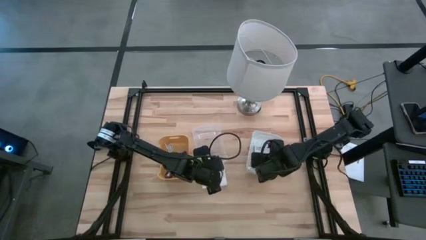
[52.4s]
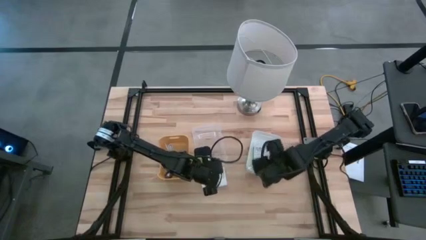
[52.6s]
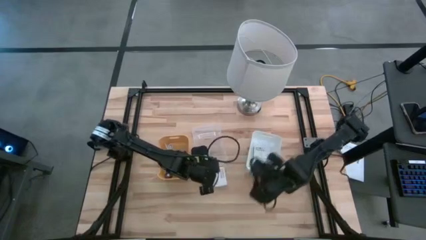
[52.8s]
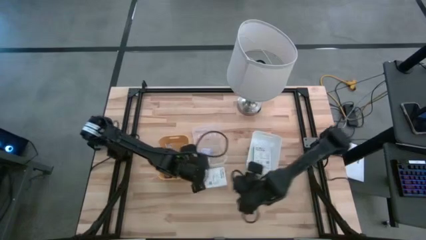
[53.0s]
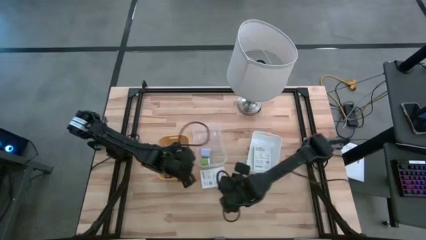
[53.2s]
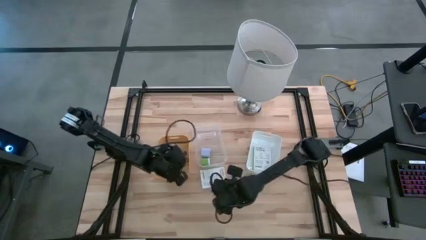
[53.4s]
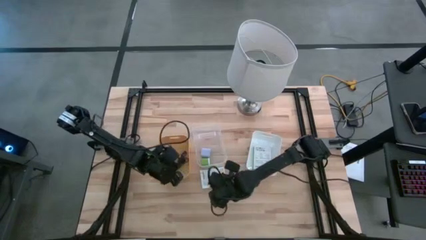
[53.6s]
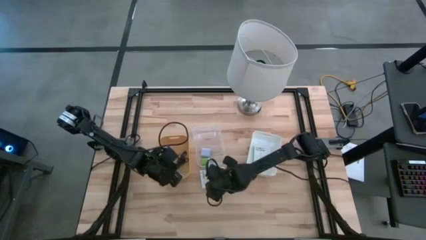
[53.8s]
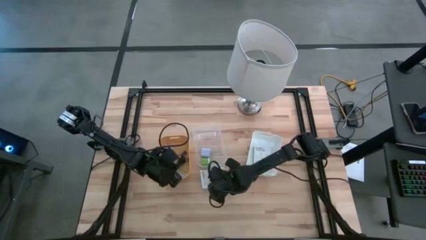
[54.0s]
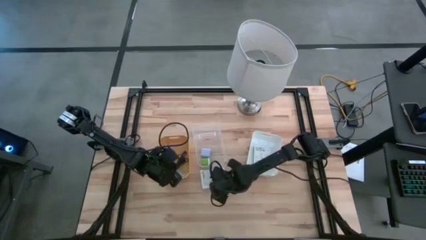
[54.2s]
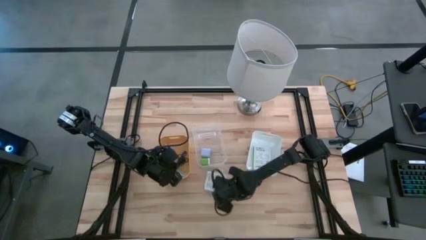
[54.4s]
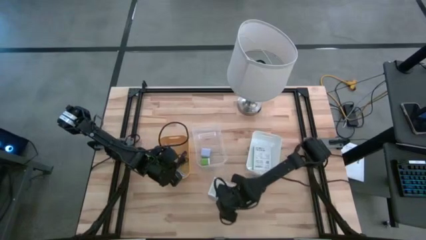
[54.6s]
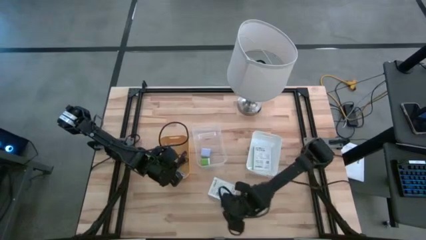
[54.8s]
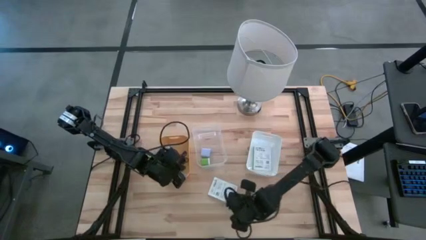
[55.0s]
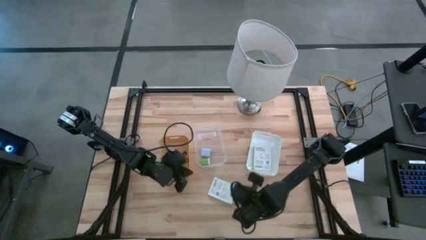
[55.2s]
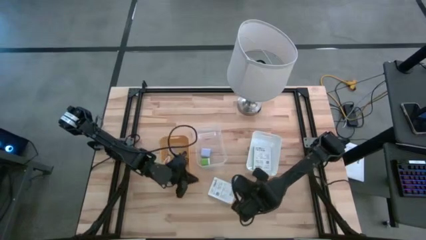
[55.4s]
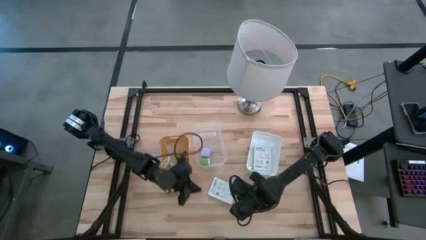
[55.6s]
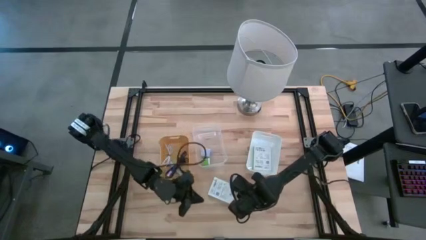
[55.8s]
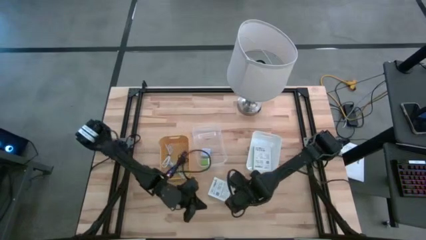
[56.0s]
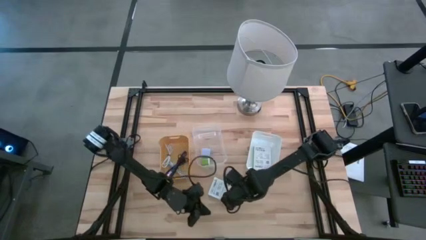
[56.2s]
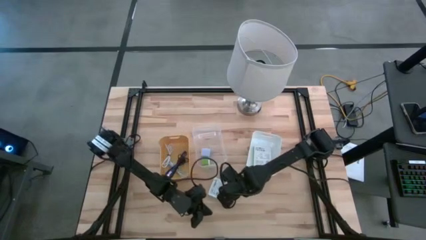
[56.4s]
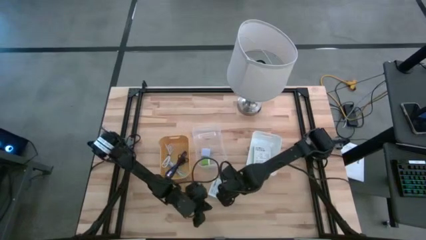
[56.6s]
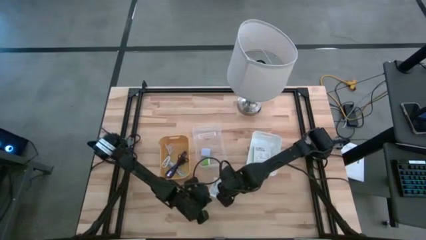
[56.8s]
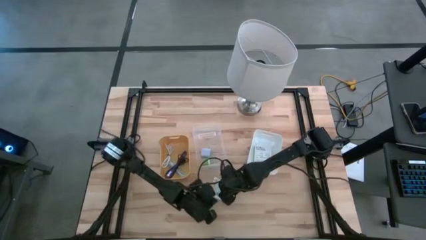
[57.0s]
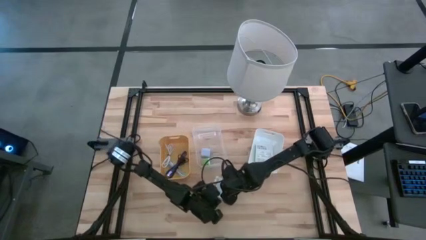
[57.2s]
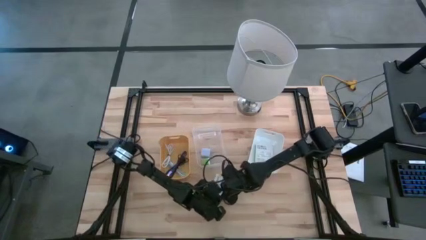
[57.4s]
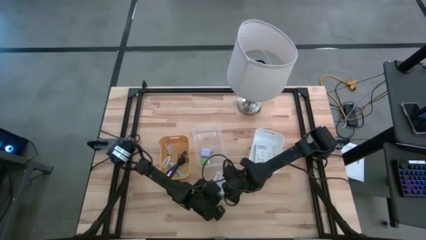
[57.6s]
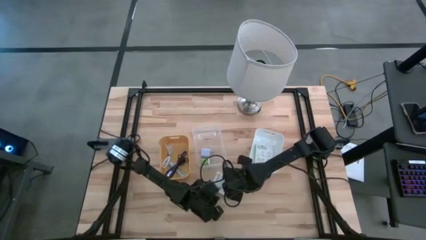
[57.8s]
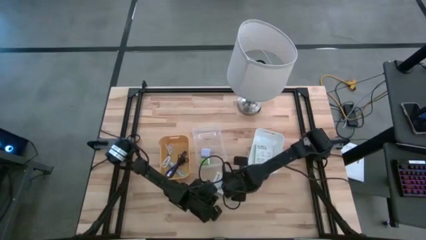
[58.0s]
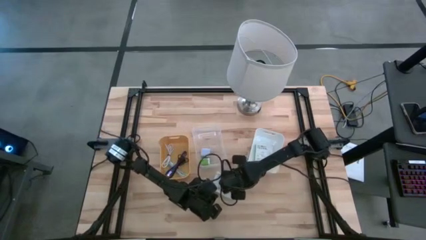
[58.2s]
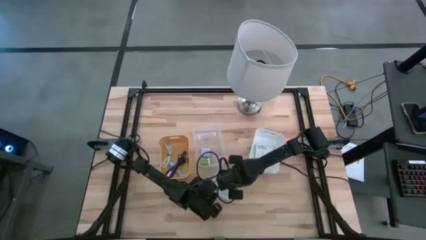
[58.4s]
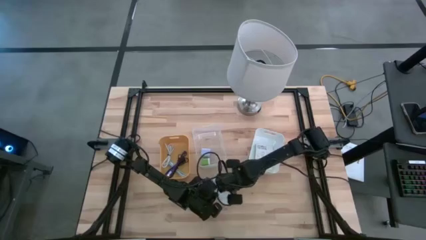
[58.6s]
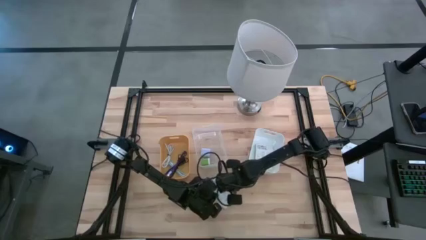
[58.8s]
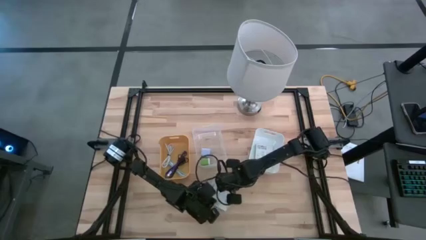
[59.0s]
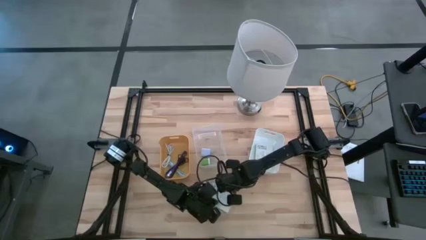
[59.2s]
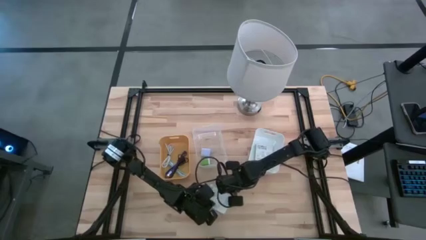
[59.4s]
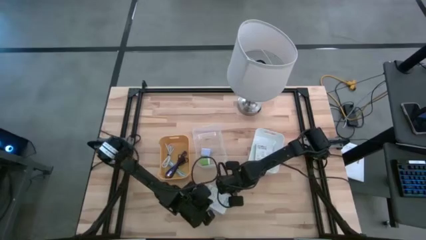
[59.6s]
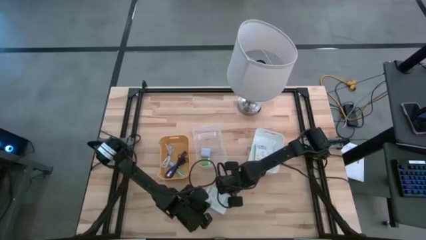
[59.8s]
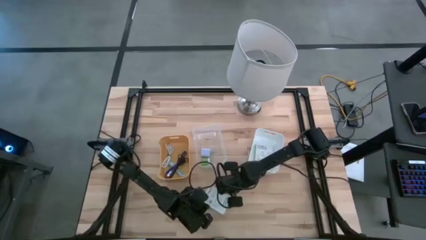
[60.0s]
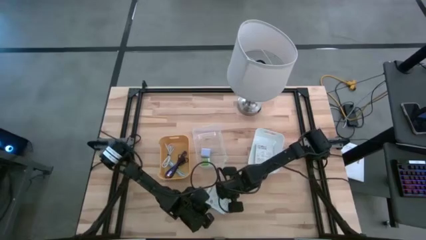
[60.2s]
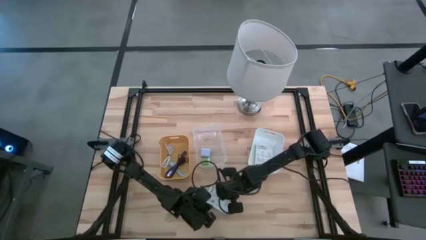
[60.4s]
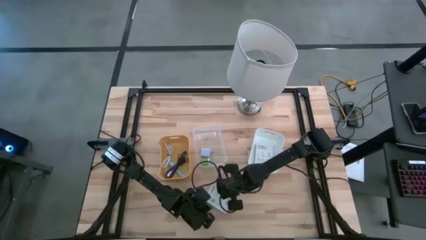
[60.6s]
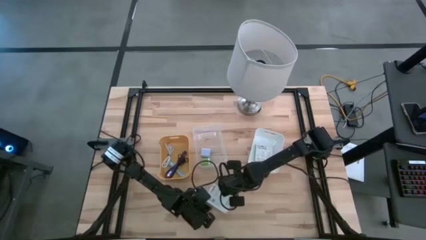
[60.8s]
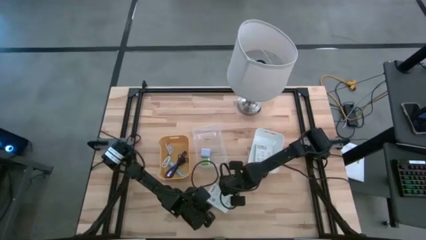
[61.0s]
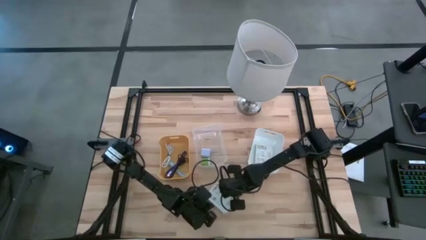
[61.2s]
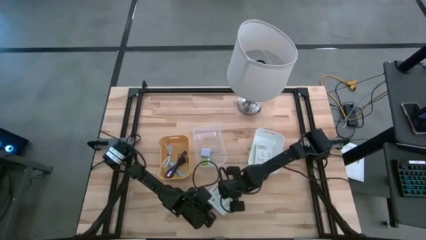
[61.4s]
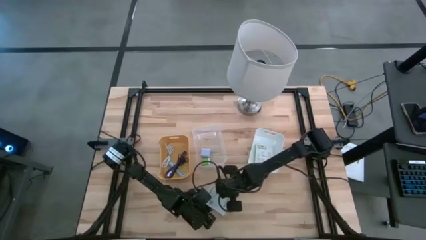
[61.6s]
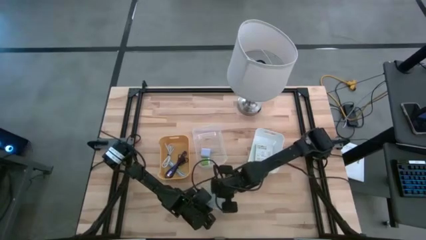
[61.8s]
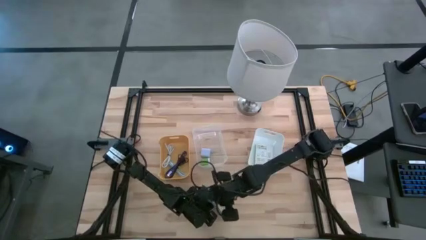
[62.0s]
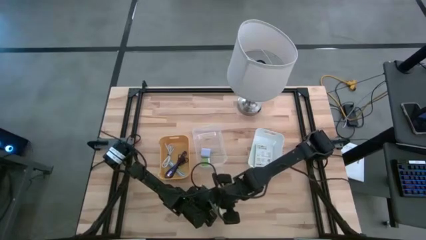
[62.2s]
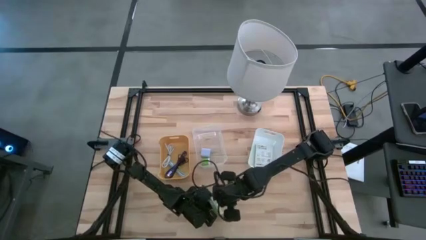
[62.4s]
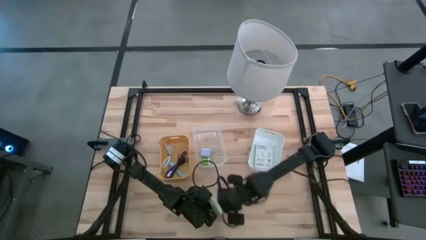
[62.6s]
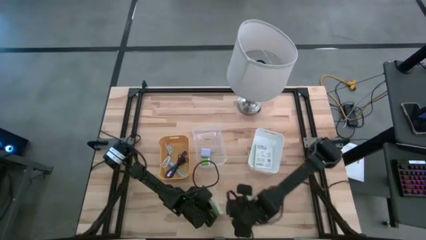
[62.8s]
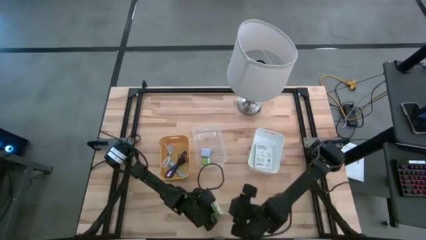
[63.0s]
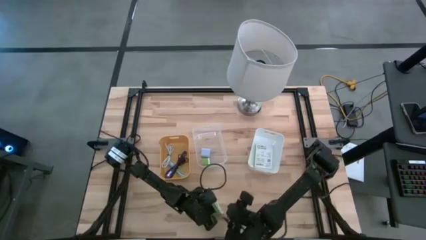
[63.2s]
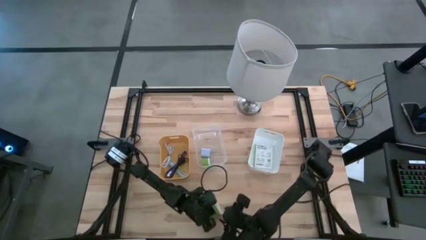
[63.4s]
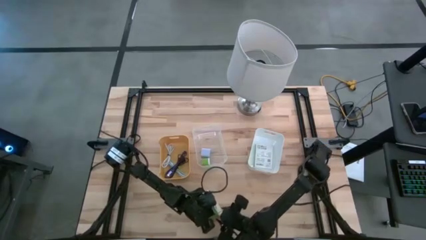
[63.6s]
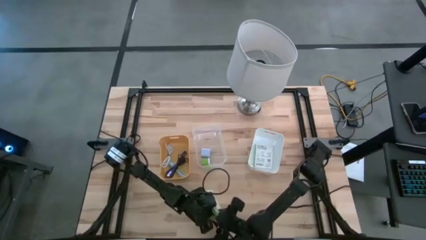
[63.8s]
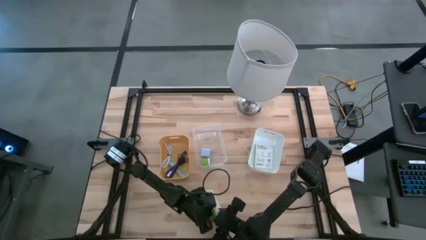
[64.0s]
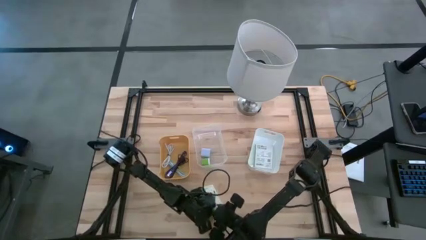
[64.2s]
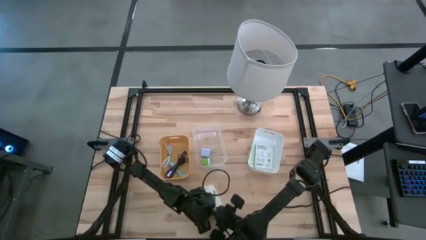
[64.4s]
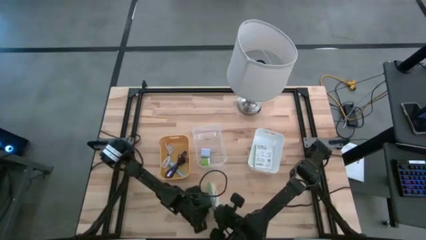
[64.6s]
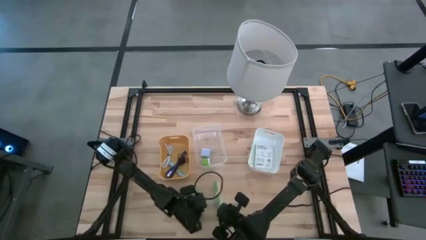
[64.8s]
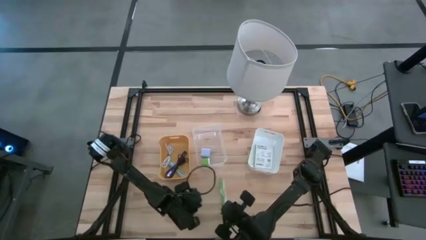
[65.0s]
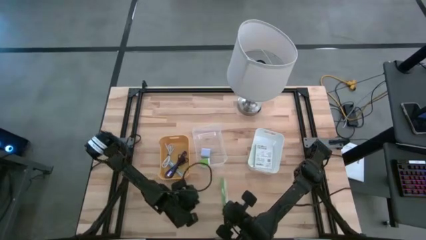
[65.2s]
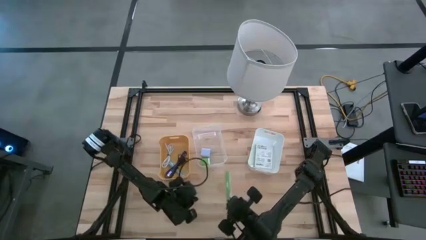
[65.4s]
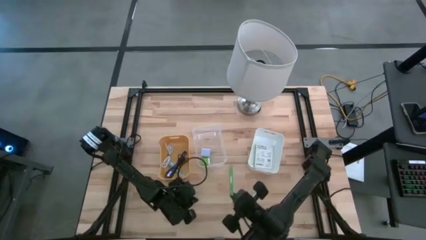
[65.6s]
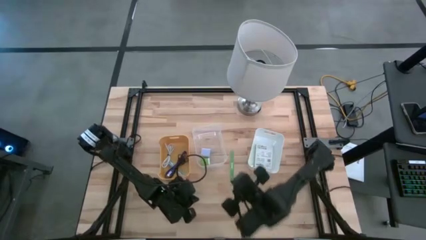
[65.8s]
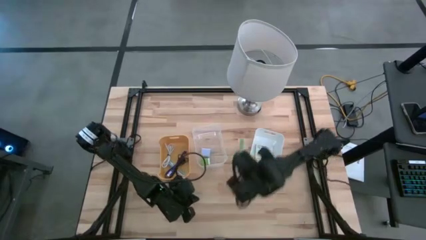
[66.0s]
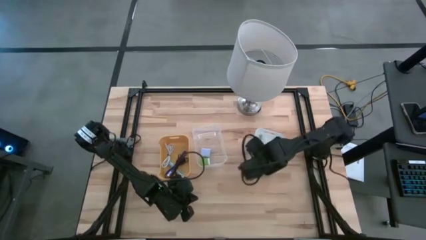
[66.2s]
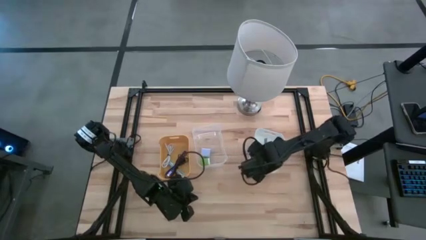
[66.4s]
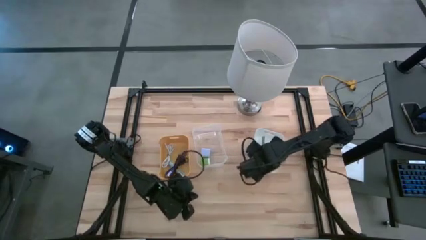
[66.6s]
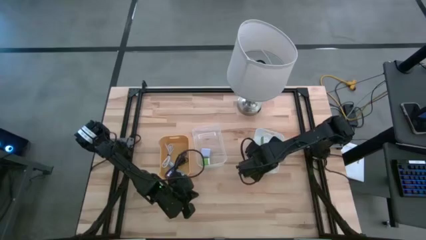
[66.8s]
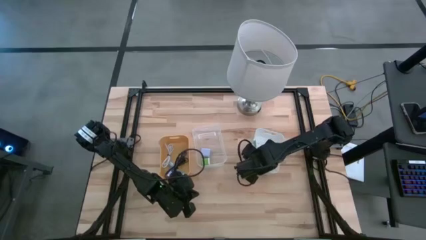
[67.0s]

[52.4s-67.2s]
Task: Pick and place items into bin
Put the card reader box into the white bin

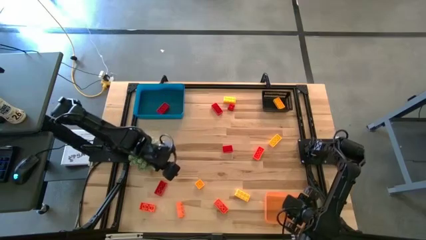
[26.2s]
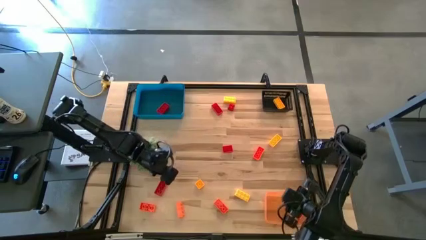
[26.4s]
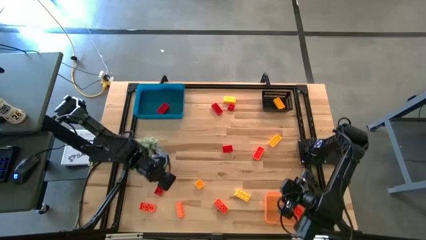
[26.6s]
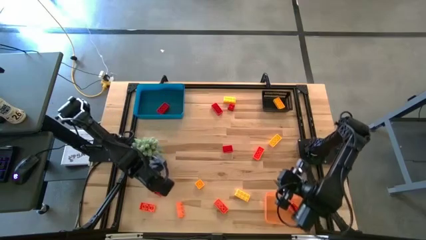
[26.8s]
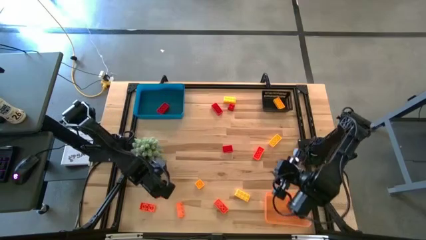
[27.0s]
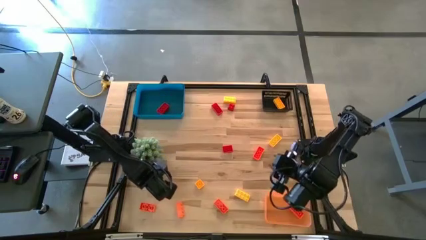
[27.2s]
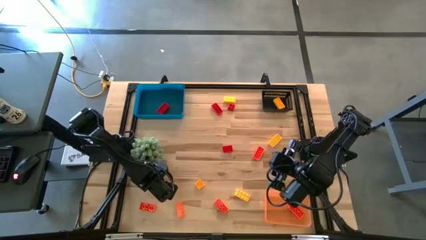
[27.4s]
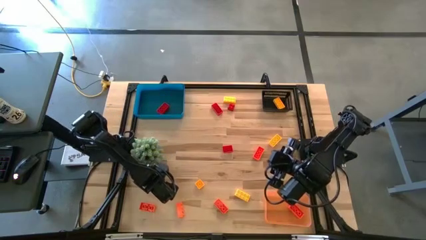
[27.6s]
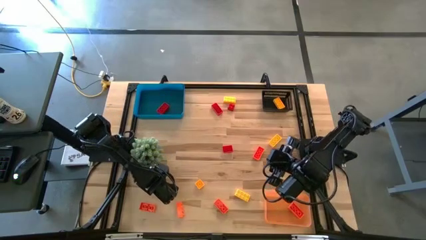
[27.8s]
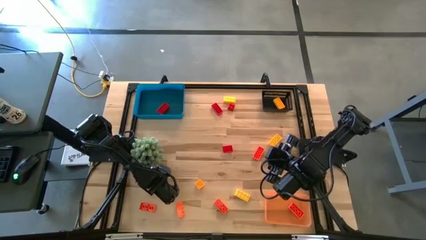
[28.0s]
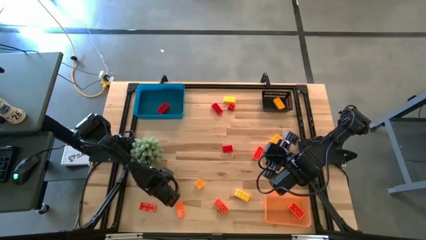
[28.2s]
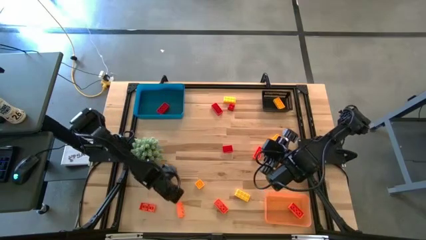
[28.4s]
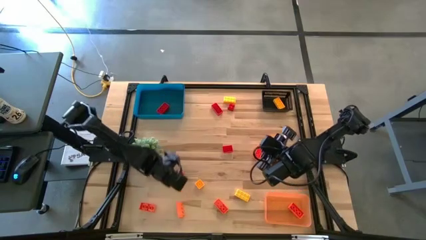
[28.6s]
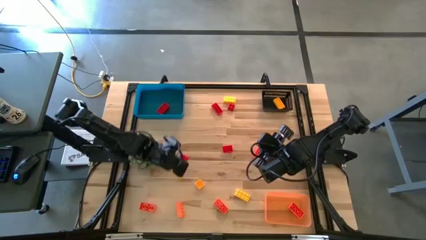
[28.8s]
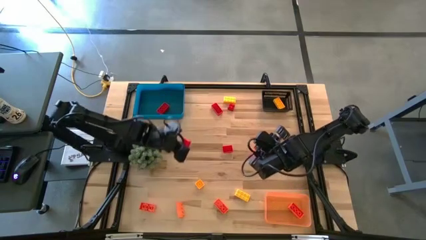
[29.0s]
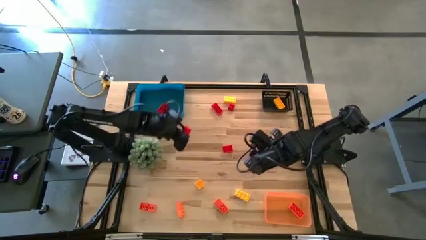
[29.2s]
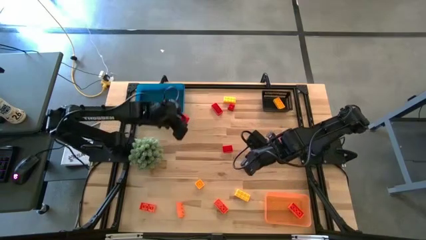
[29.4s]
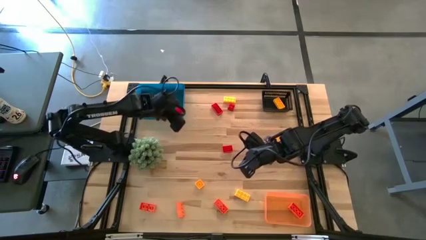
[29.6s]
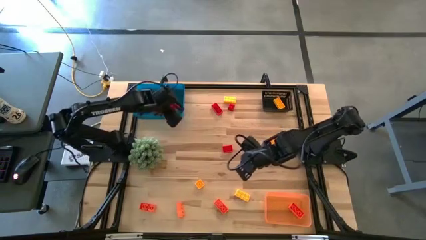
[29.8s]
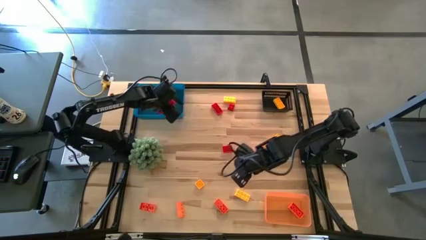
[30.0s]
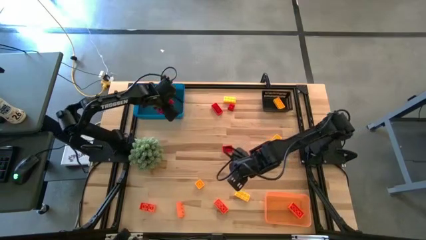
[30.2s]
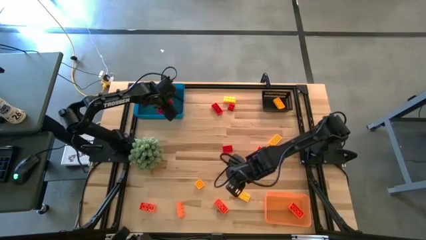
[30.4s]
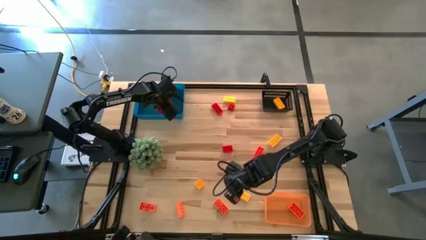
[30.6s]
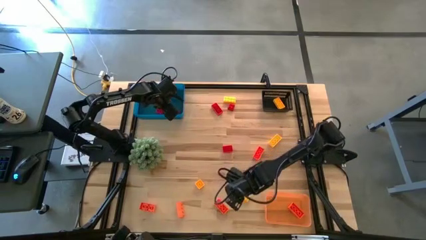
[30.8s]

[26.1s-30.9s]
Task: Sort & place blocks by color
Put the red game piece into the blue bin
